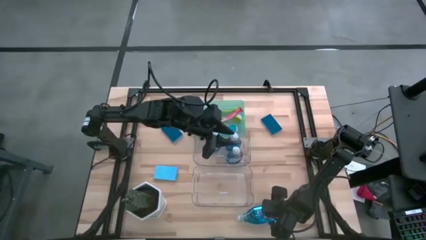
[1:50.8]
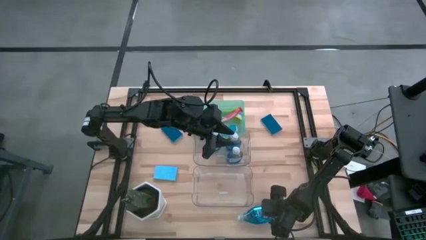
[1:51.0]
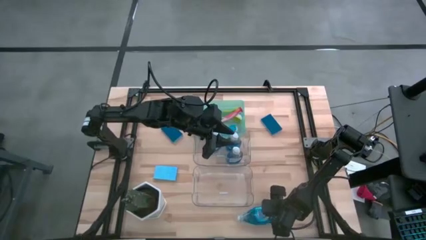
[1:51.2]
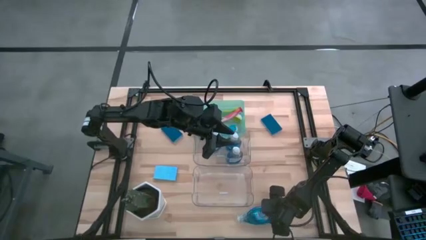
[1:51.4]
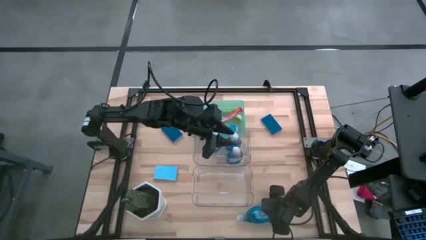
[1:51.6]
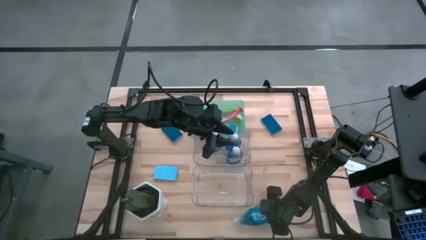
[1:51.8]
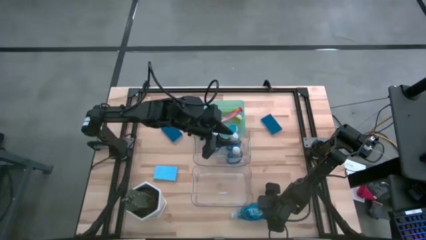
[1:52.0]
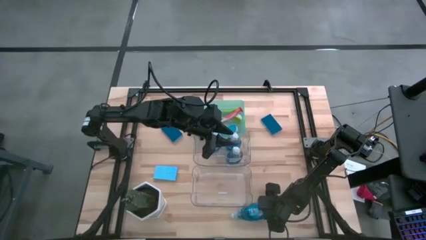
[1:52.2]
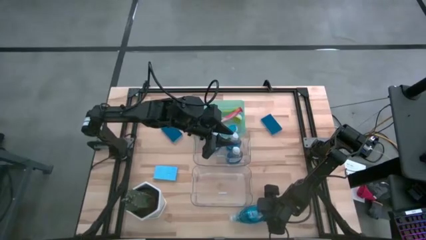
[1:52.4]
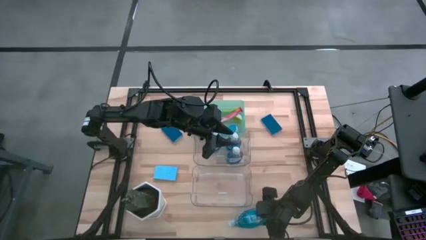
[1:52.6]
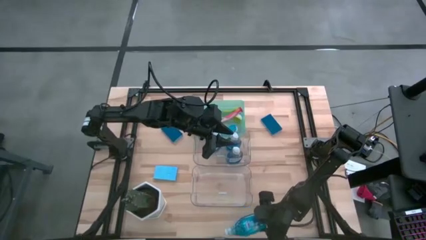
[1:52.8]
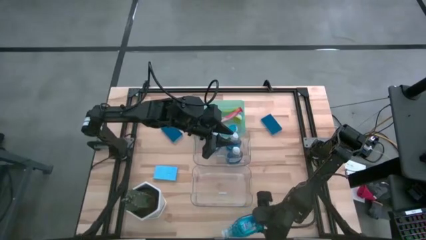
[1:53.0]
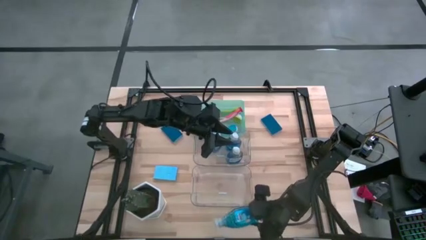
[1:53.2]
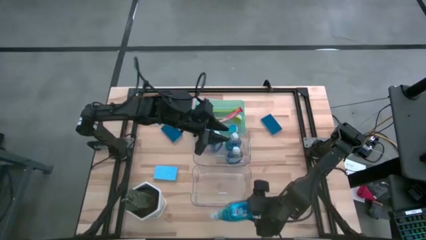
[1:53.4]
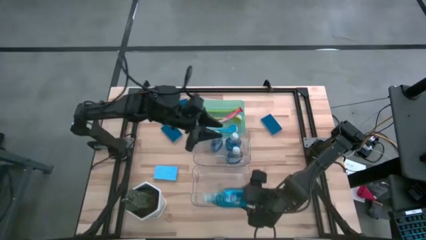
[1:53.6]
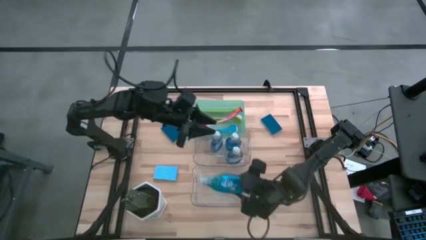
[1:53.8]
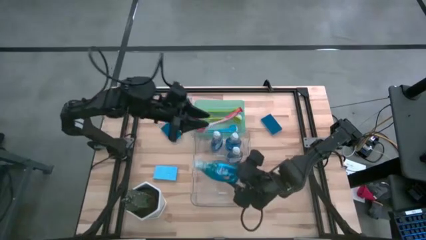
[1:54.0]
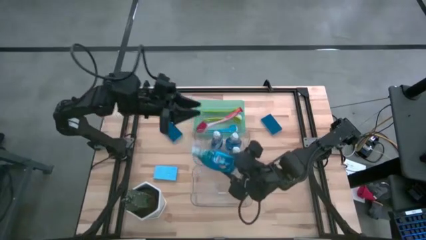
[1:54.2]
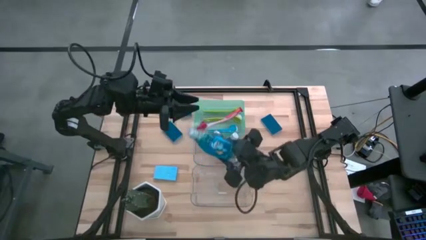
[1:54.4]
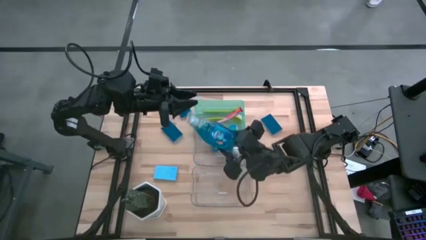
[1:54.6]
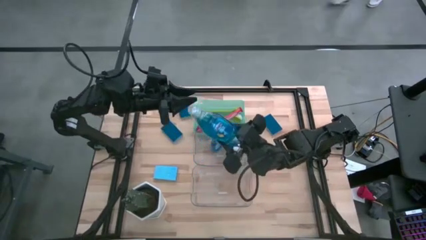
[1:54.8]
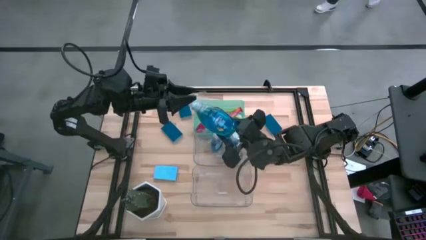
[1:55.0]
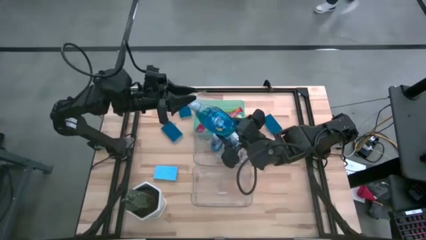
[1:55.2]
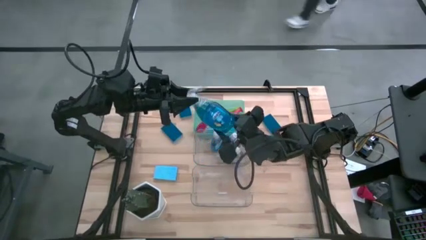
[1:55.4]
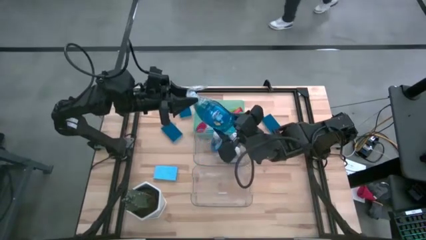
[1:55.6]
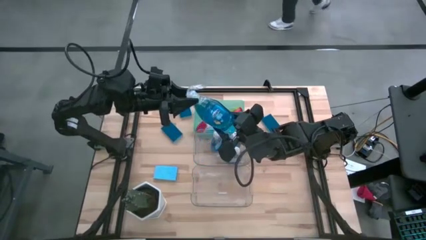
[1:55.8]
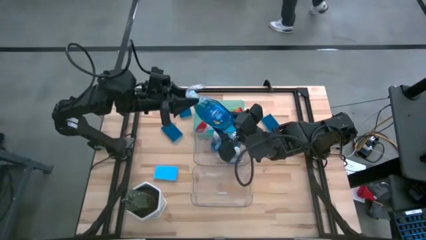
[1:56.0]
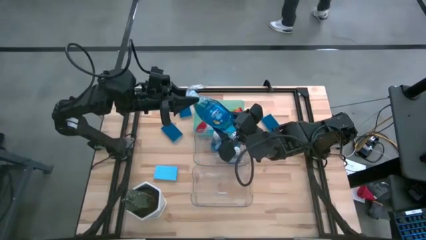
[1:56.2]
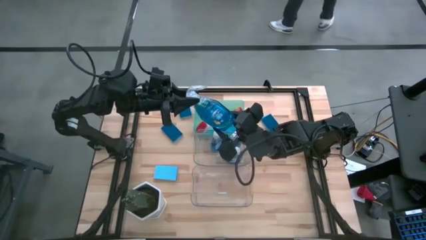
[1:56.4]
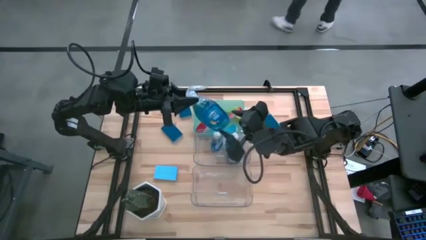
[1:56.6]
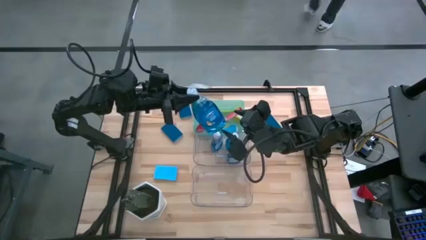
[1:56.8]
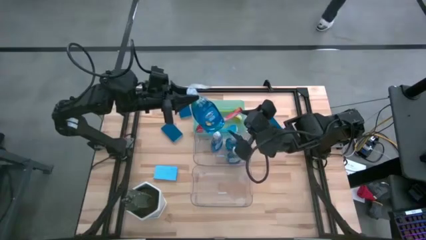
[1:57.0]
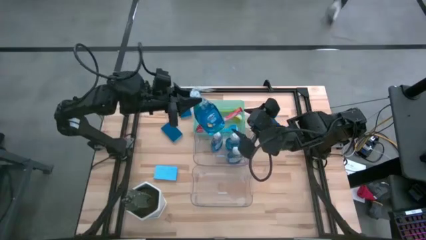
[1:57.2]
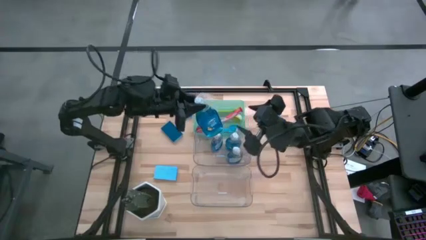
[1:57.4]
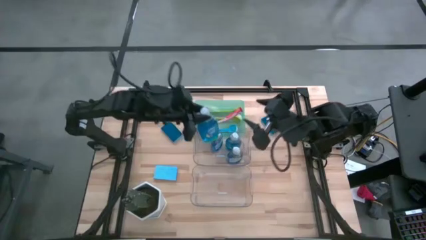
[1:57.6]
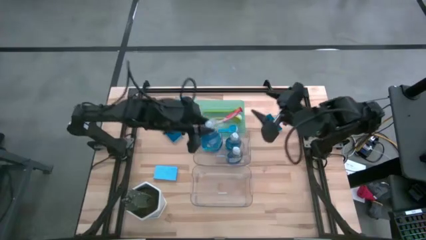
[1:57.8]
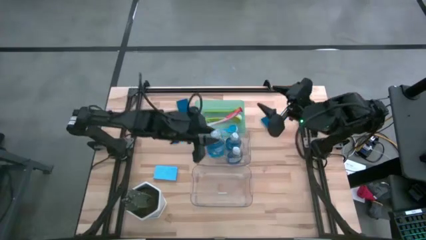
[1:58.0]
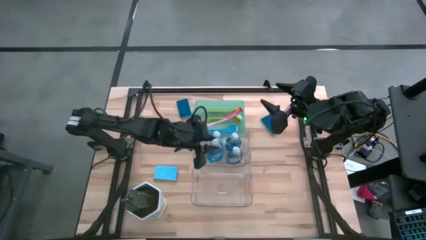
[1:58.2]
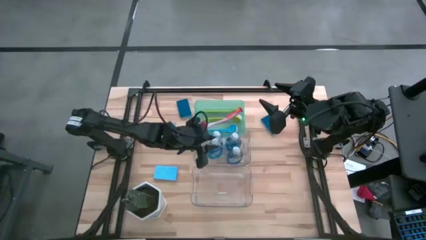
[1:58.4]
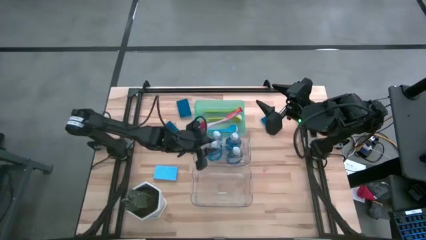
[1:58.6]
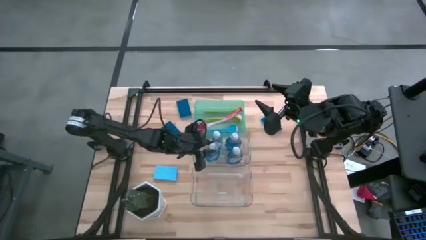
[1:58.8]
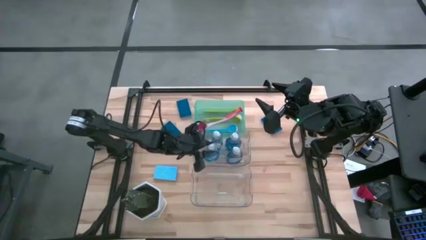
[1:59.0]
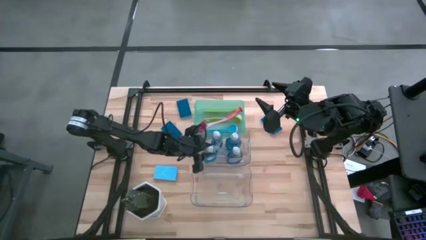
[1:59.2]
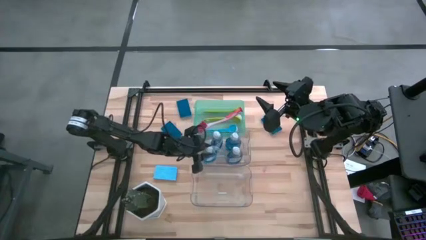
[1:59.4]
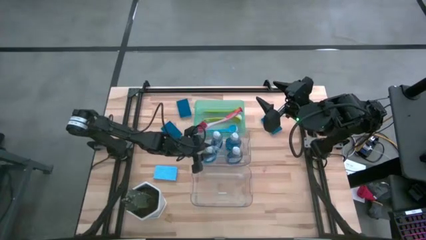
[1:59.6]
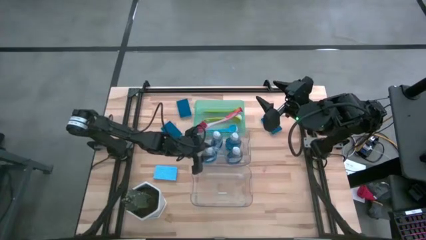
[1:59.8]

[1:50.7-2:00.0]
Task: Pick & Place Kitchen Sink Supplies
Put the blue dishwasher liquid into the top transparent bin

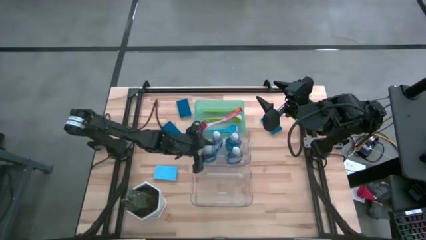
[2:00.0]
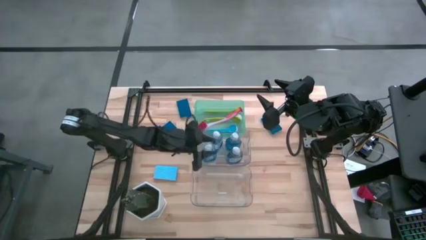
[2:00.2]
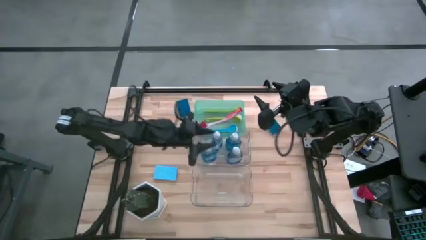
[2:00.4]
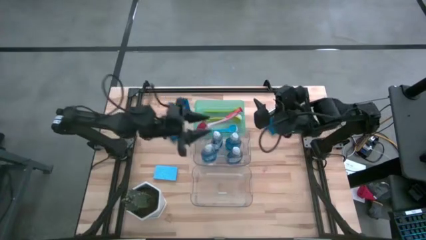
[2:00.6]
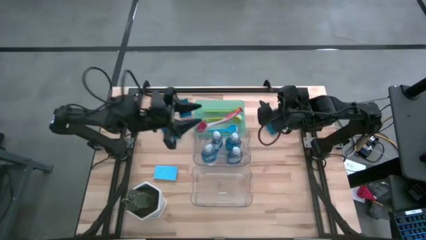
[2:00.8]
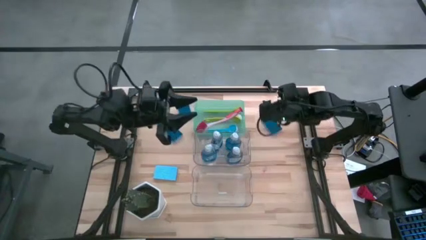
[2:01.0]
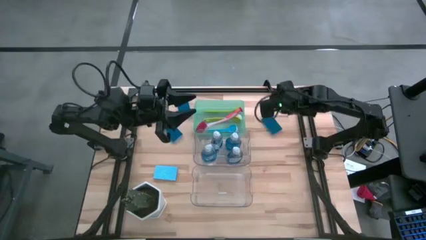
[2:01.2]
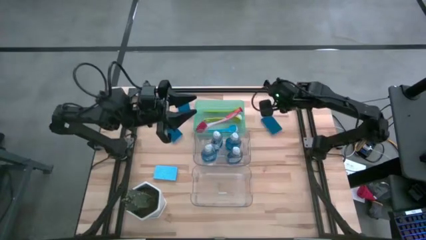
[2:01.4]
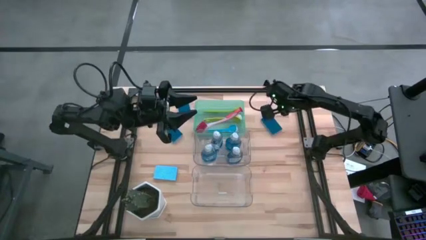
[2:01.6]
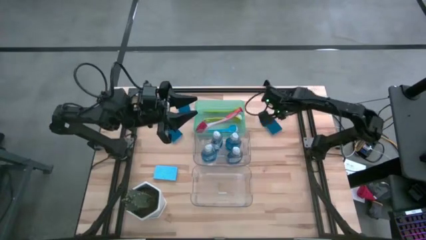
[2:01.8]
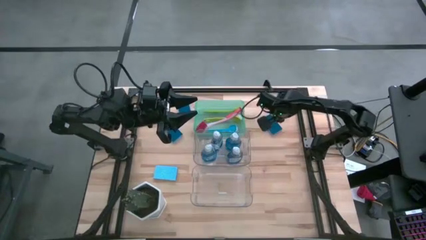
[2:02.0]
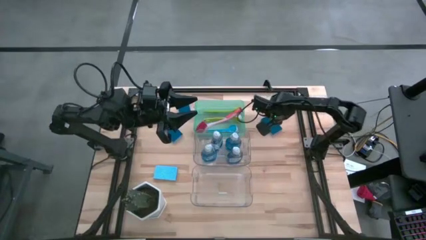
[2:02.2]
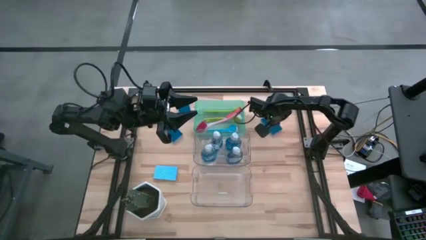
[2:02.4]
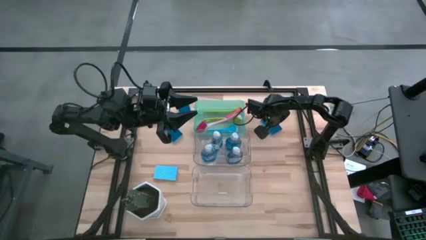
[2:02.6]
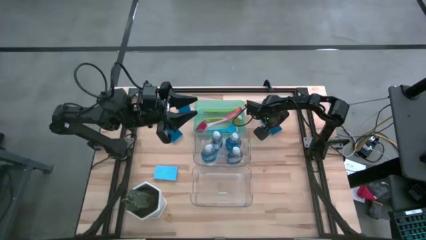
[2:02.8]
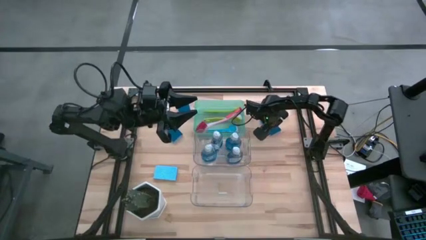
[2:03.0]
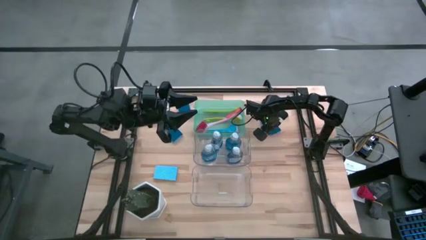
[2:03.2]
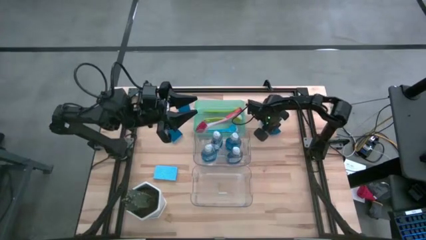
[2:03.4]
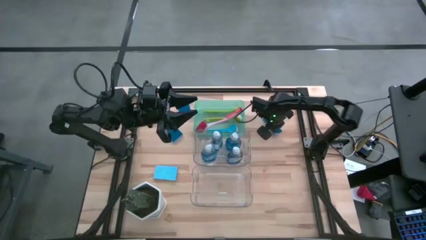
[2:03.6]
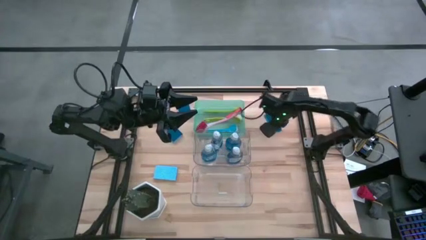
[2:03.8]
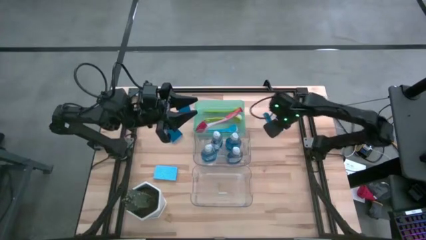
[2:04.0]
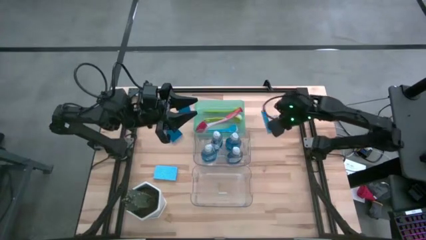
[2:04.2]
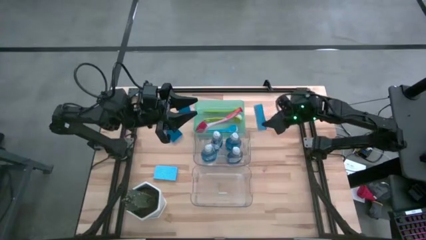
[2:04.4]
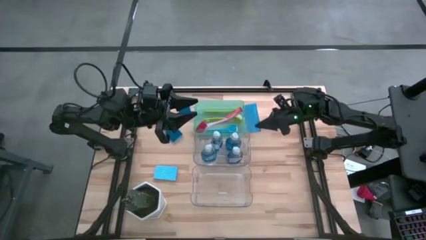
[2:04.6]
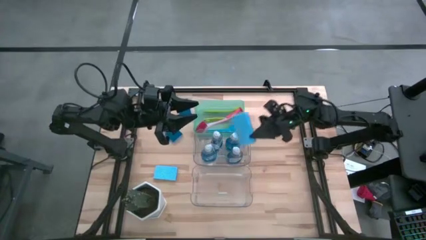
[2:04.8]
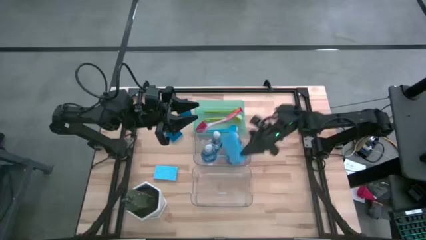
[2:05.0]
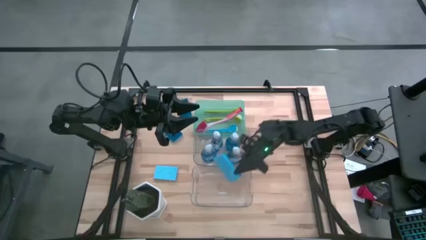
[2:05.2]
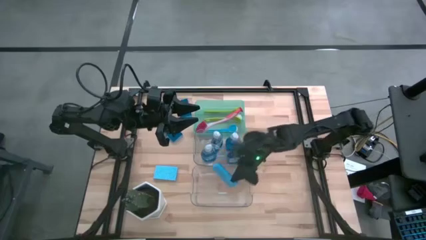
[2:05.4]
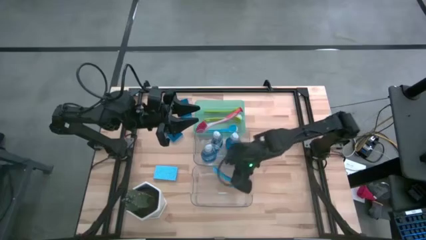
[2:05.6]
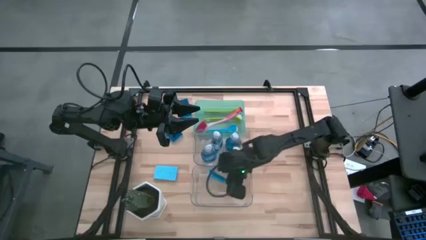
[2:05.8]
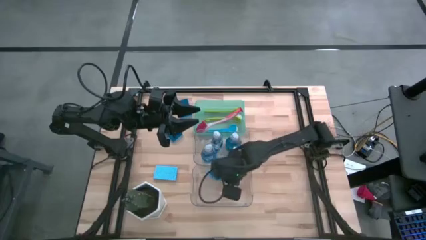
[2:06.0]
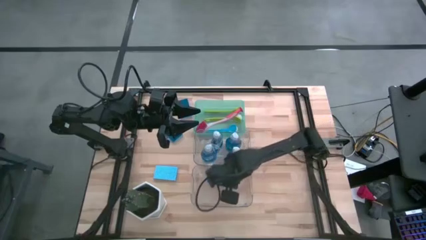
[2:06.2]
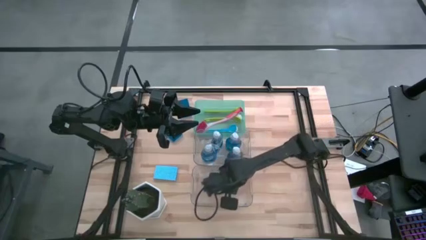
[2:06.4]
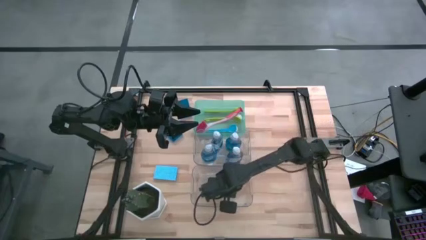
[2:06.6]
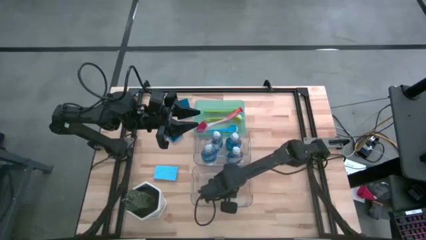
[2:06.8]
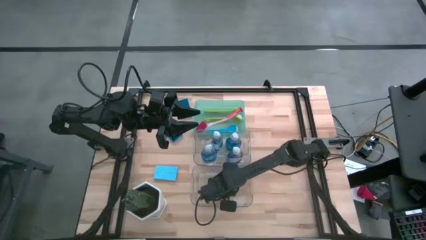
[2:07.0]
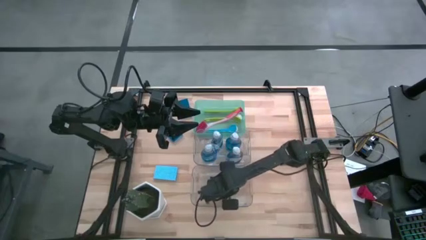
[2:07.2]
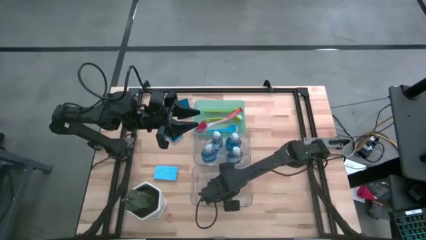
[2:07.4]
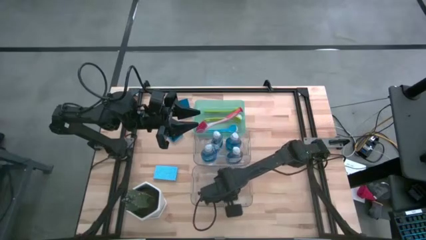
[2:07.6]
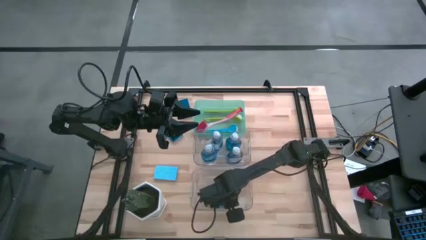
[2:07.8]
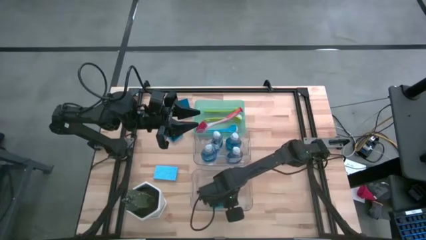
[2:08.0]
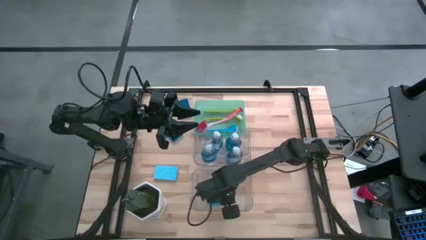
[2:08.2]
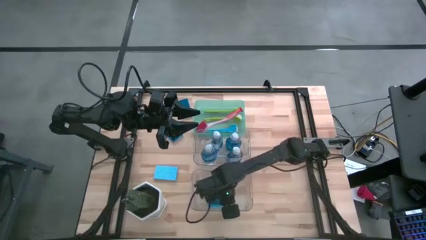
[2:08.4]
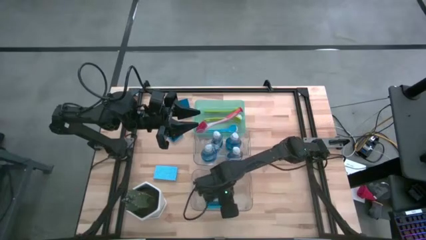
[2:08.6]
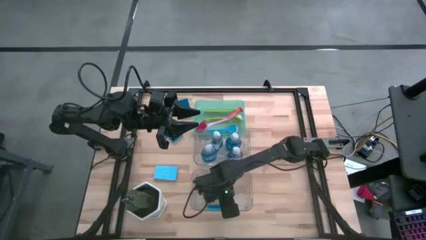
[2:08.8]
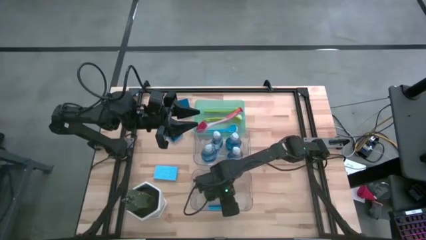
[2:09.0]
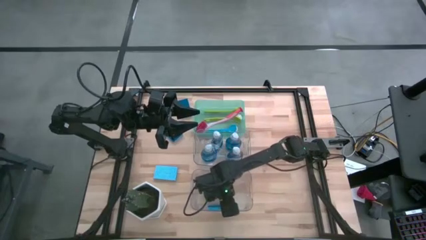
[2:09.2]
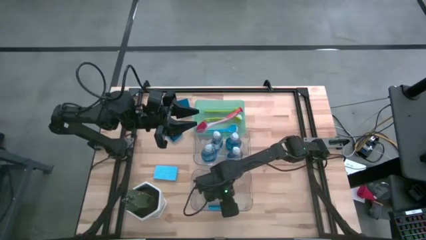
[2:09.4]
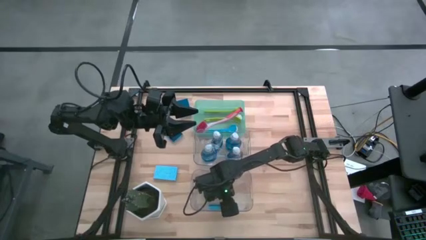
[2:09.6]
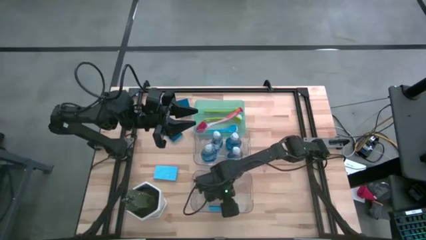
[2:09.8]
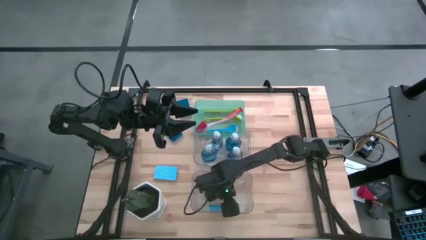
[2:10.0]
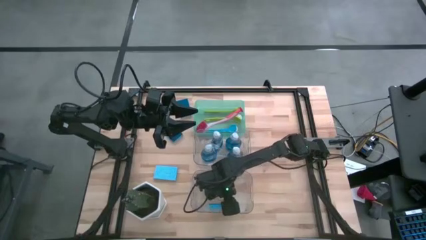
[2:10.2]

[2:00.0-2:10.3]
Put the blue sponge into the bottom transparent bin
